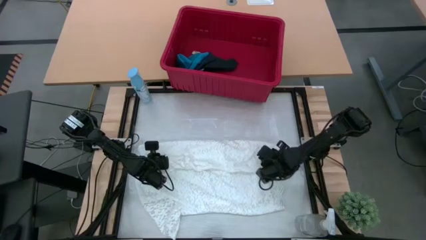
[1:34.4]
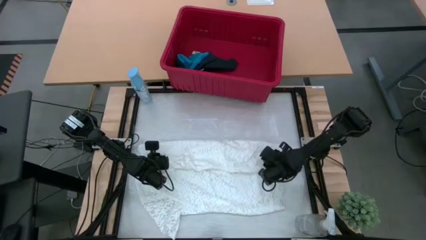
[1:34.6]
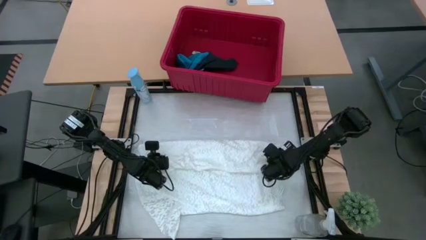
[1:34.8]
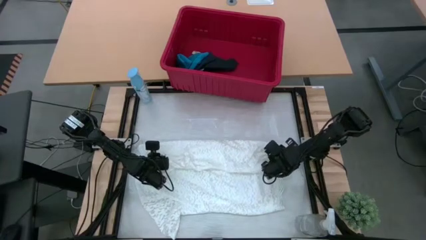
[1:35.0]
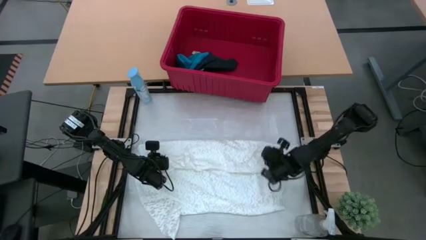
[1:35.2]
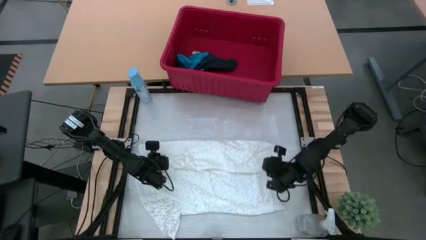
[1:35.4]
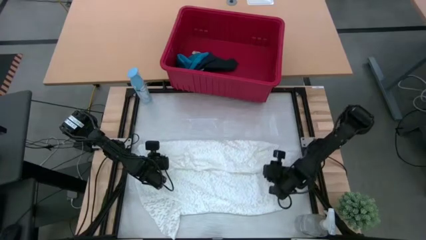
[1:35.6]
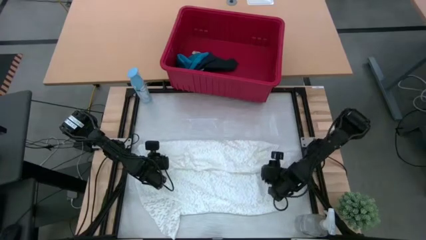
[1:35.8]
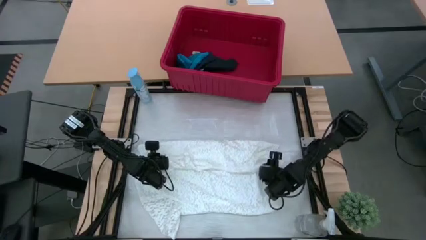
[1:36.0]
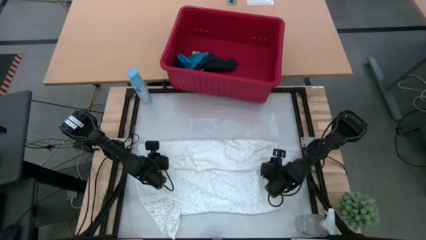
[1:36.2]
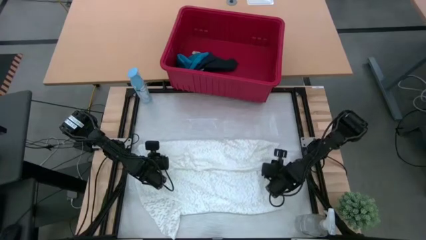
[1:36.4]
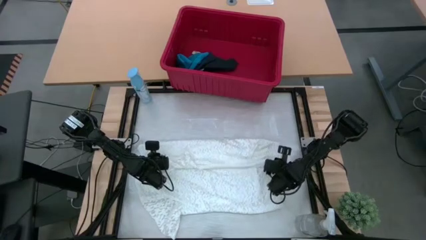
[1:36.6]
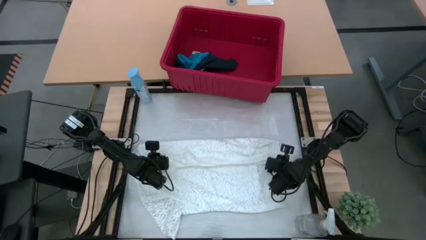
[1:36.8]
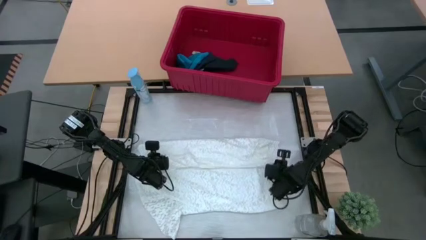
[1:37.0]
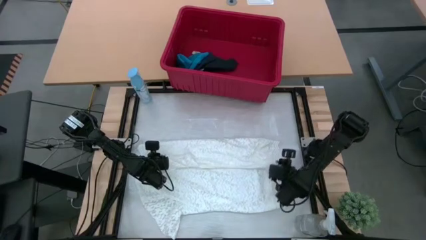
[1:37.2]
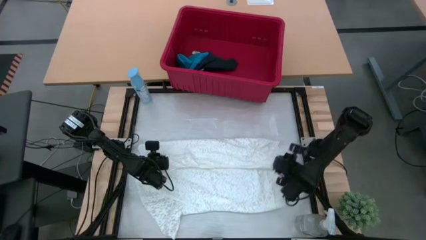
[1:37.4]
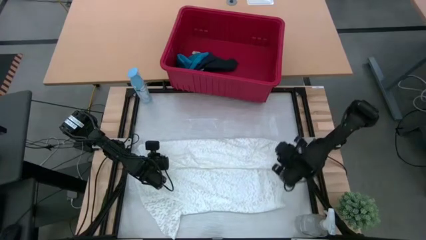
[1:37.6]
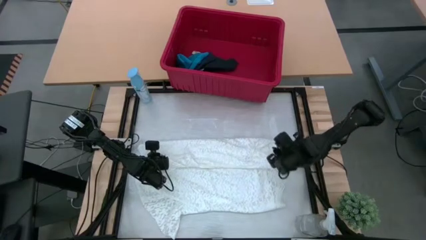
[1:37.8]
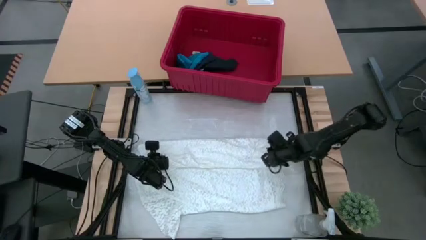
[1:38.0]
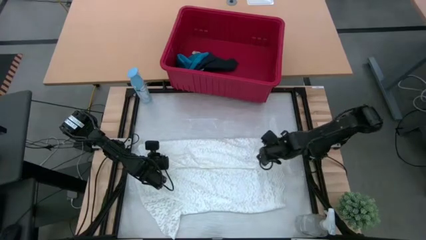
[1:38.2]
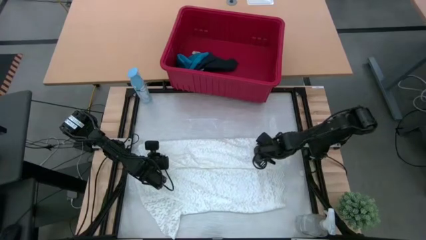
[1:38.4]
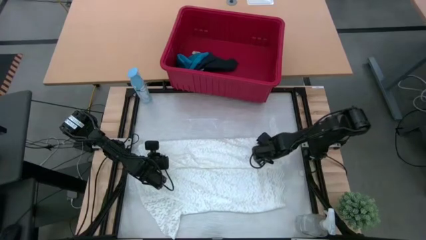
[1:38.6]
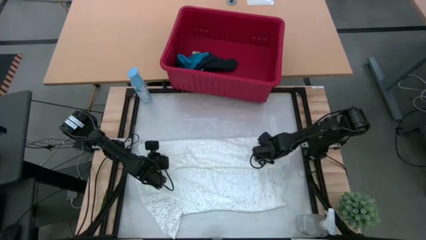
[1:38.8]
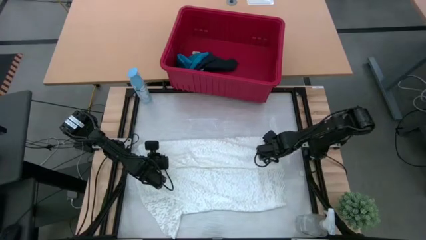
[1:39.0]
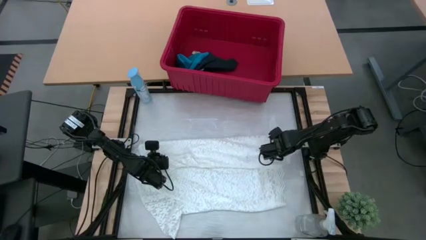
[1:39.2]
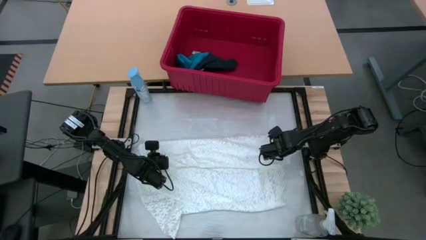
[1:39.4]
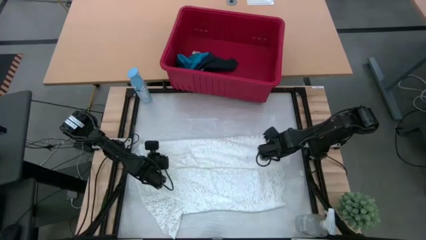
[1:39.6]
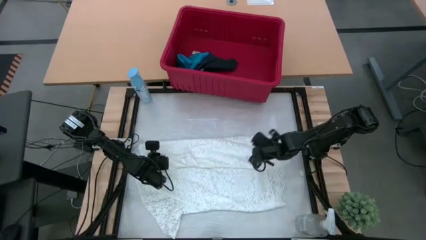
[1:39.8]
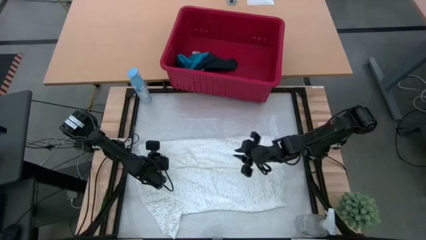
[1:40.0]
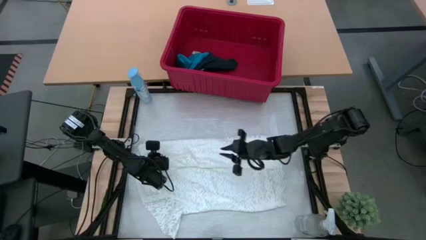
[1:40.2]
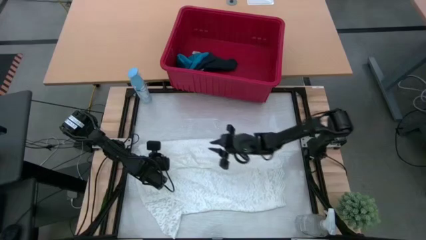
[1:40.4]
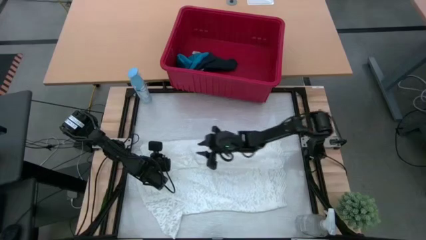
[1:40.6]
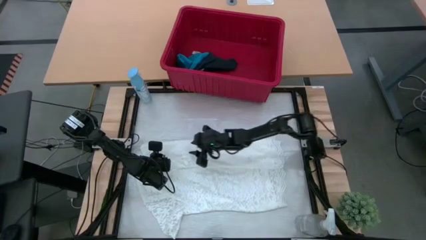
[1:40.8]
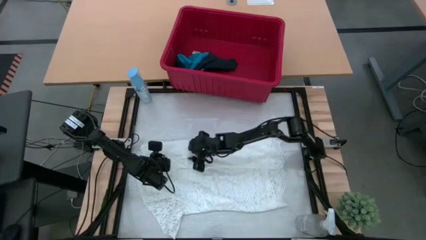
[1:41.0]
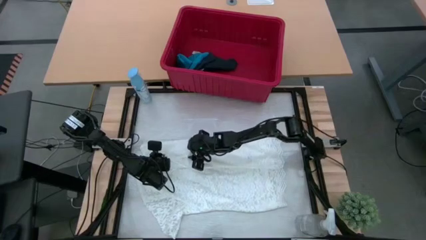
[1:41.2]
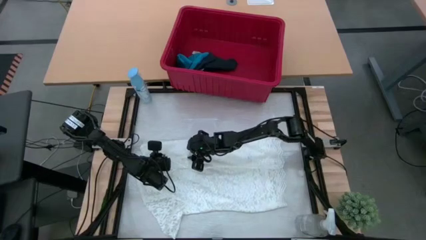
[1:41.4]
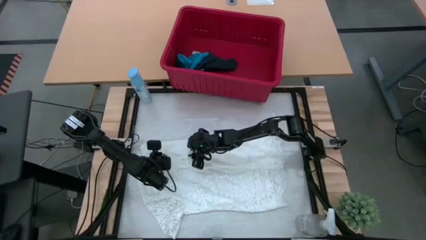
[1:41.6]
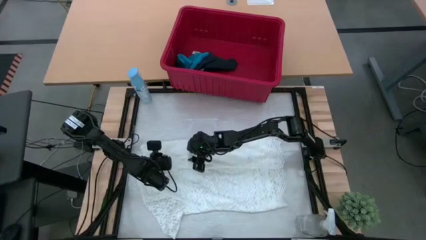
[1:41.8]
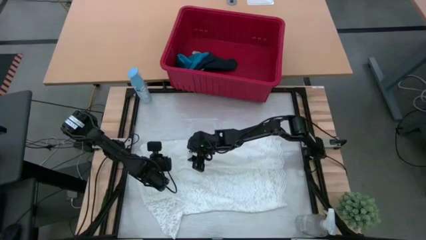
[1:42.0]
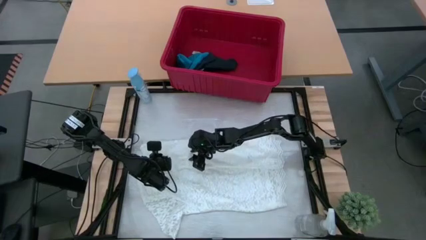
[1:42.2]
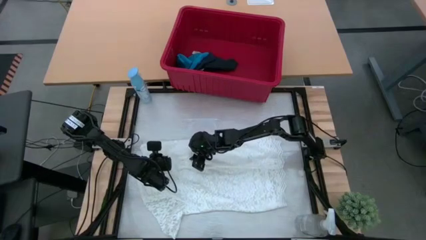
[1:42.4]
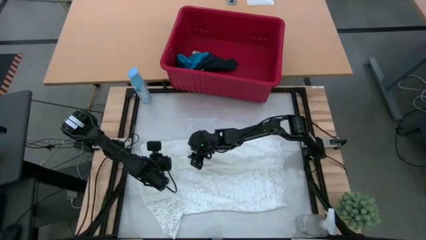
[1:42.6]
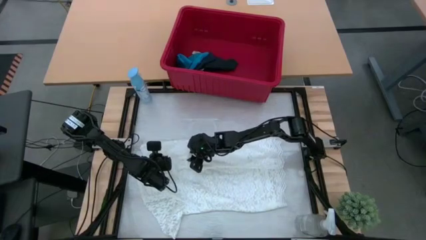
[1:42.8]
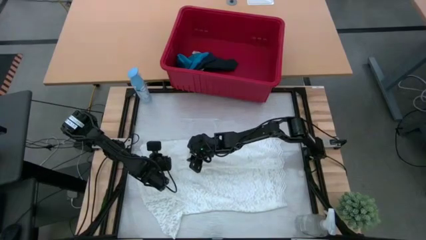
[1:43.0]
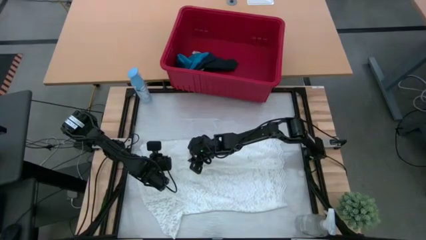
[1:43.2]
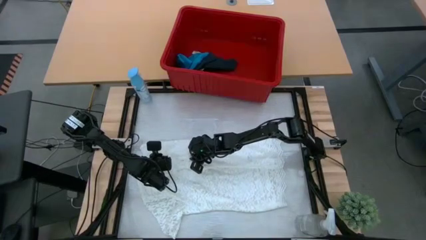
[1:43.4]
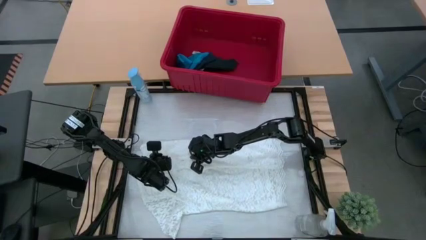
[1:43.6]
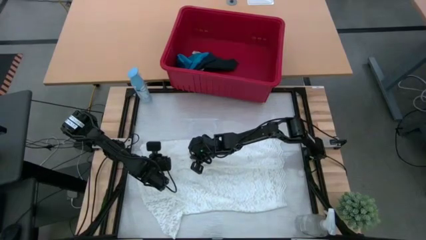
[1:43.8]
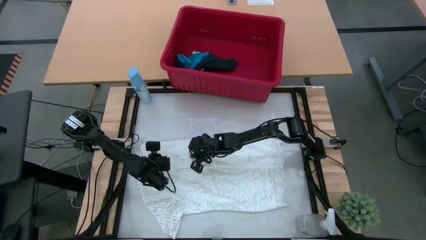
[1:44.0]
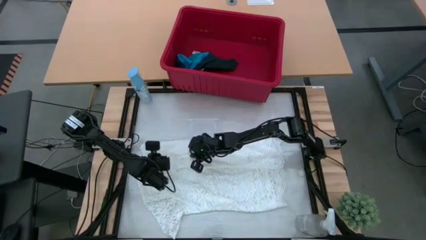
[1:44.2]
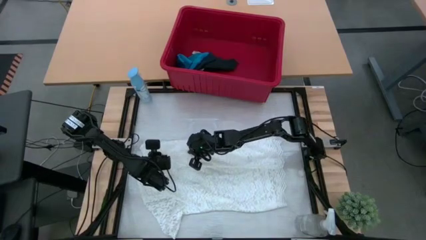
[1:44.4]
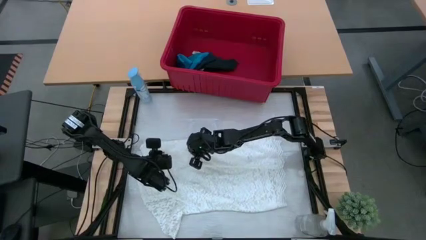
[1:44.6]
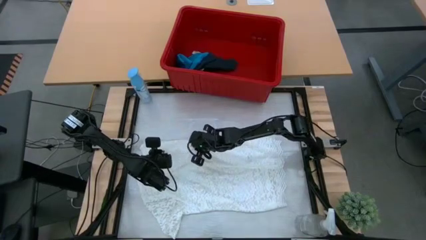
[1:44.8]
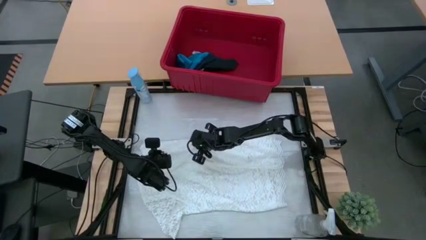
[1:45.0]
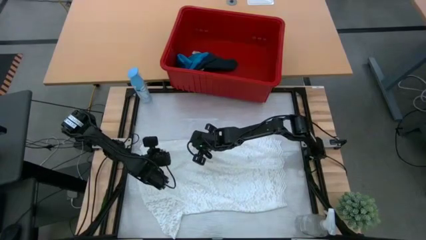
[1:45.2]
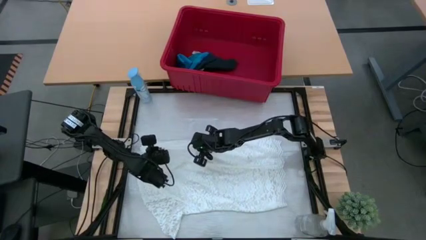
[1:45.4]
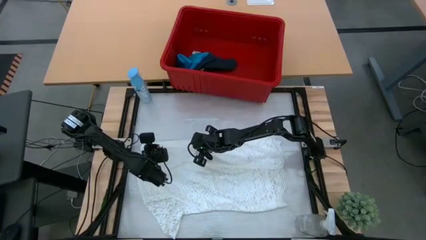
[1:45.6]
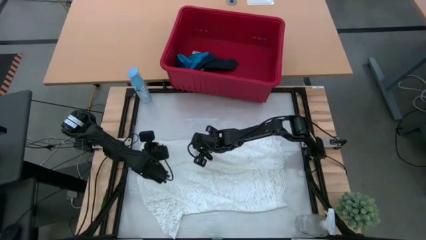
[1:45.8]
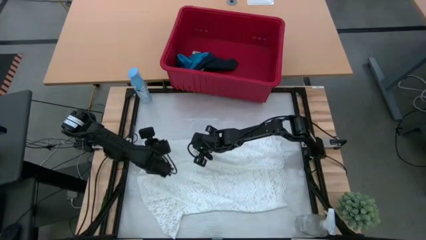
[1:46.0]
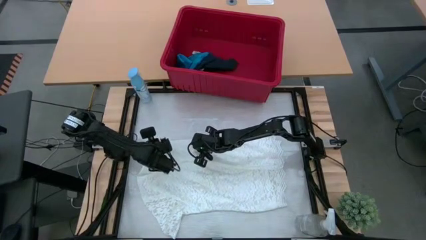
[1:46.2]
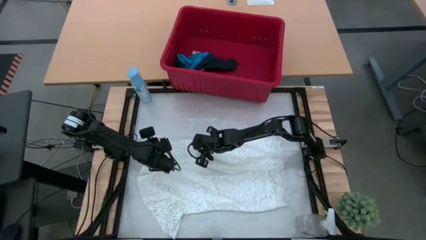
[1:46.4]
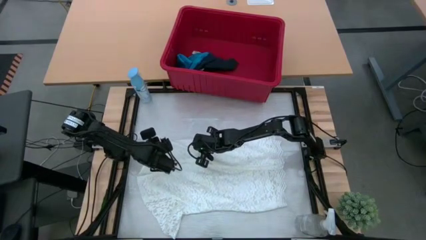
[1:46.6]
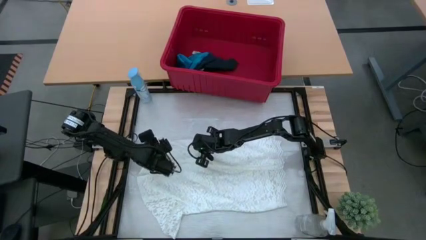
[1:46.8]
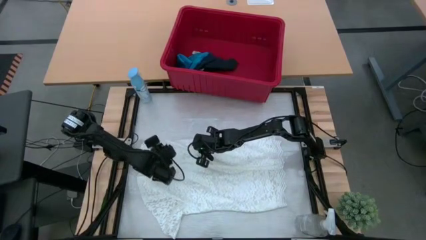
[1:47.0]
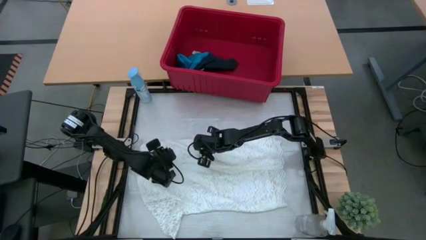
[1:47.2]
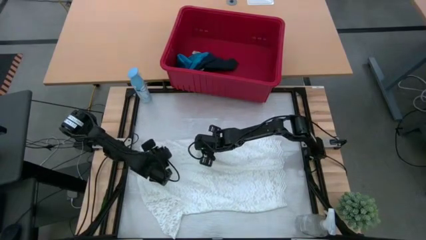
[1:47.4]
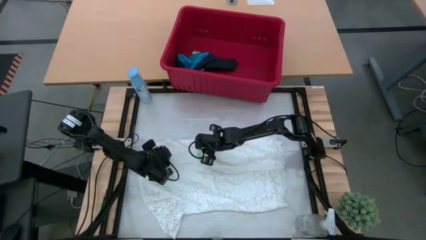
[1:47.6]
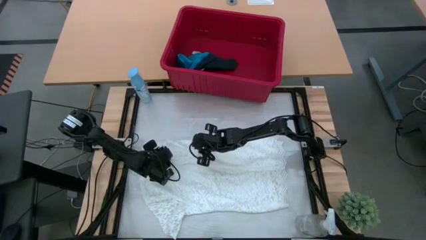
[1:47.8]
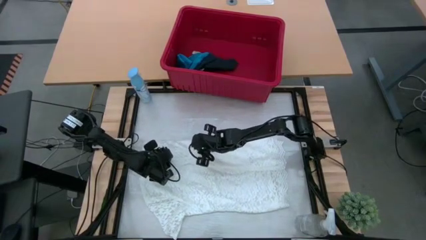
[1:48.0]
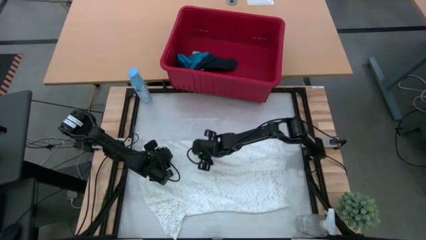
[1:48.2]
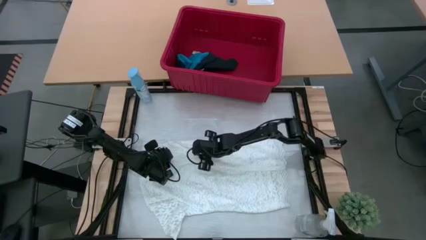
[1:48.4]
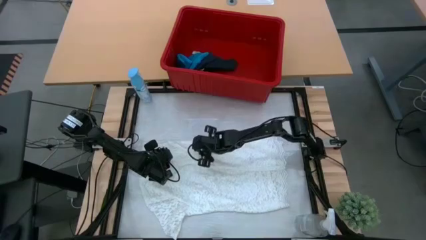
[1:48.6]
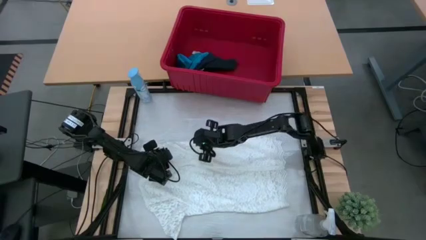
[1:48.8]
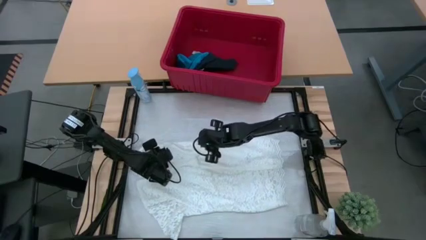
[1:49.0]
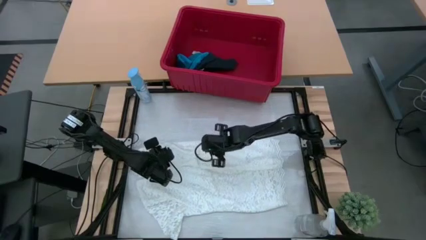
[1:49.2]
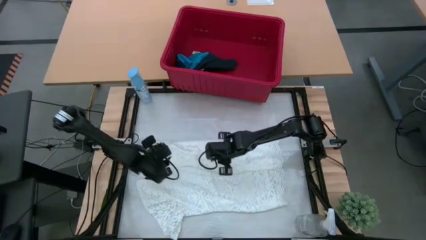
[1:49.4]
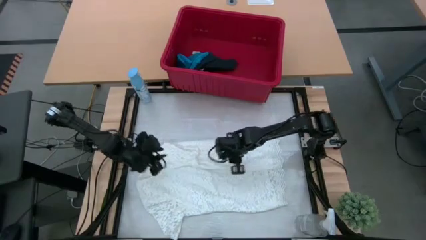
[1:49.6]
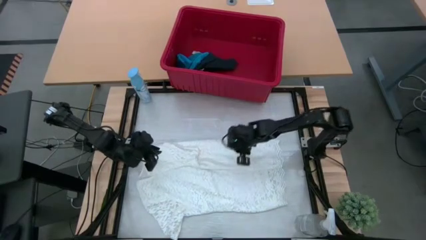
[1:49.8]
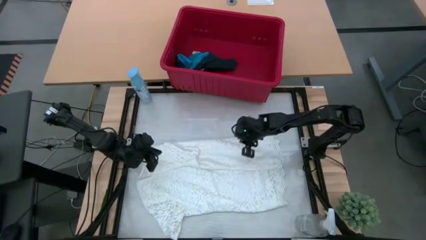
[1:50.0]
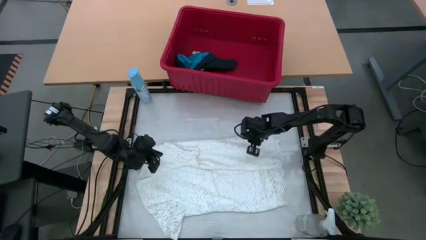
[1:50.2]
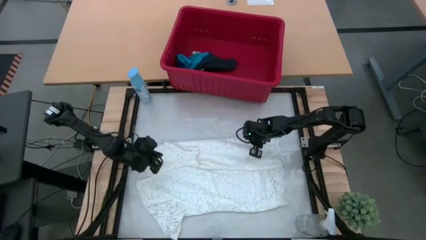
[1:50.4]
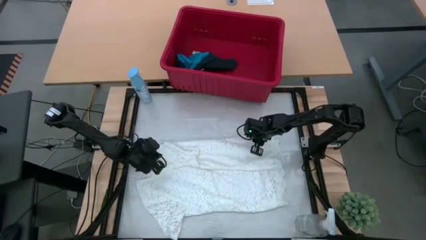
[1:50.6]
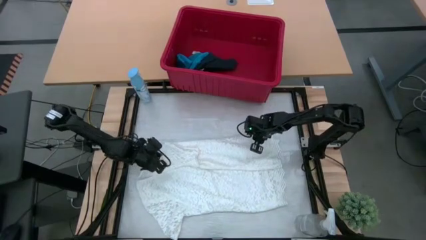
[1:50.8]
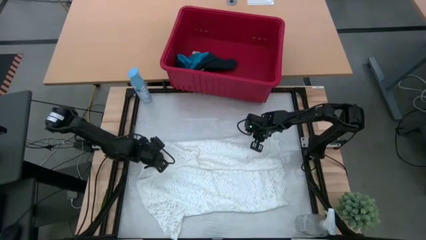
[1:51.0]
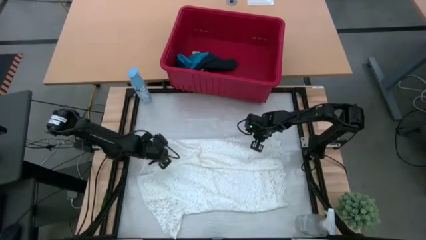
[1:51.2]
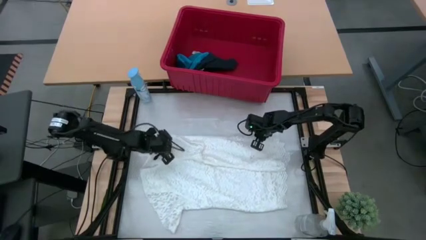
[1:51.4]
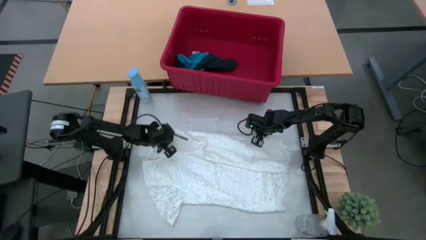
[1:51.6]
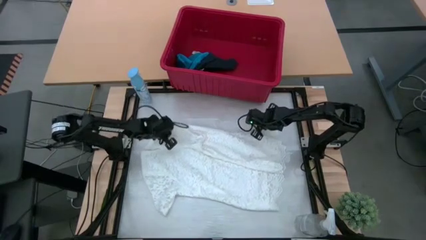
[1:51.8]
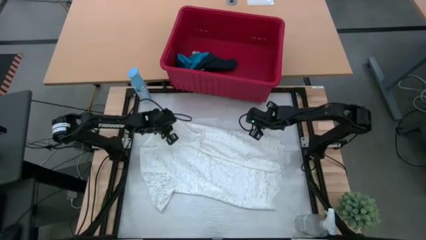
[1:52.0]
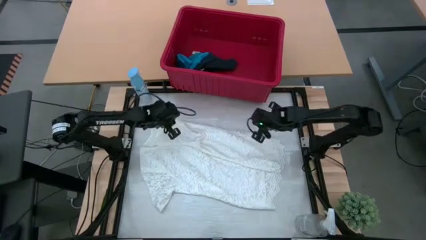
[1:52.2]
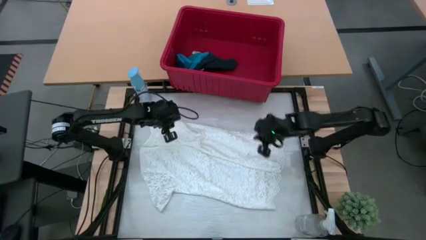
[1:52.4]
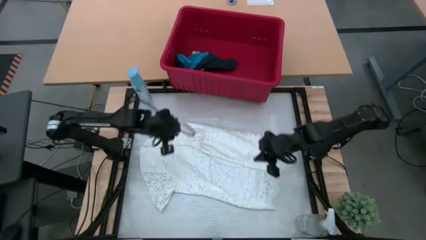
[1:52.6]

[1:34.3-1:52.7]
Task: Fold Laundry from Bin
Fold the white shirt
